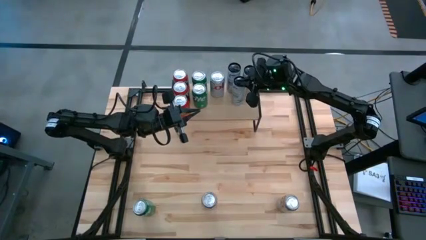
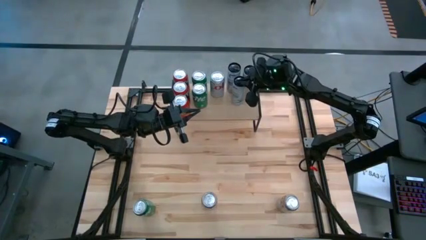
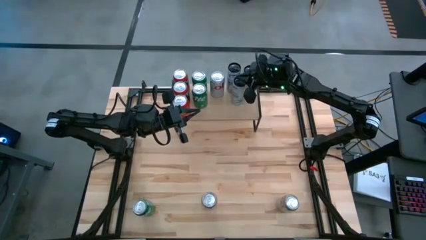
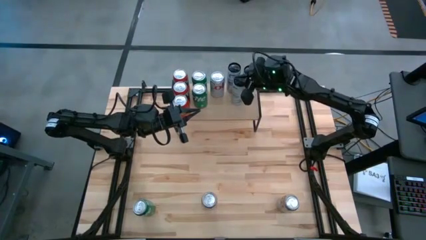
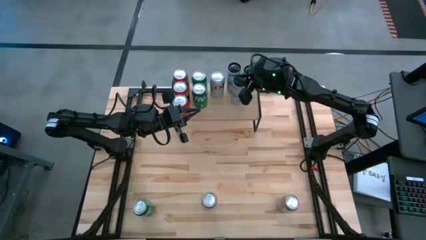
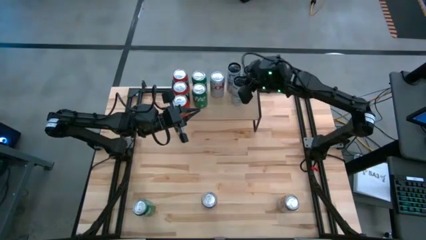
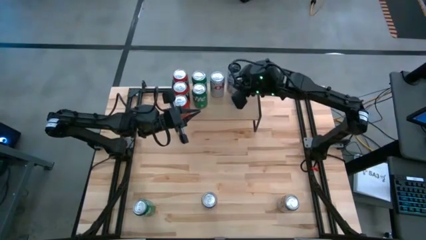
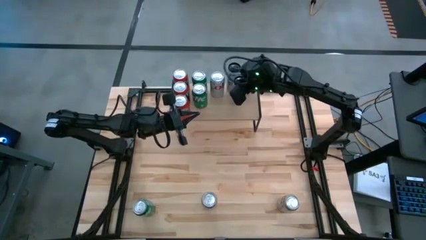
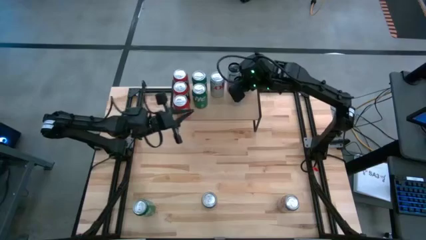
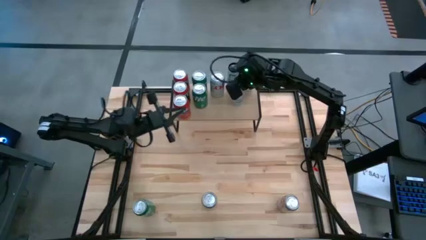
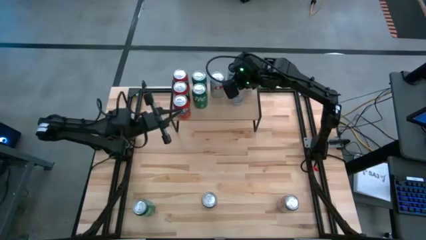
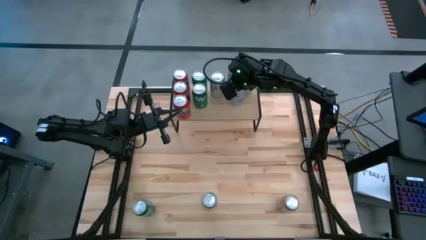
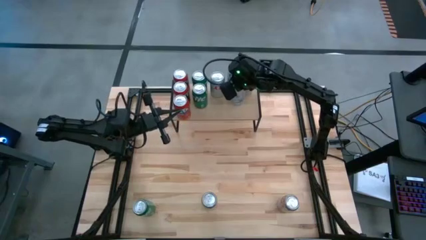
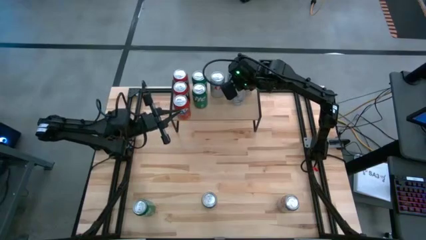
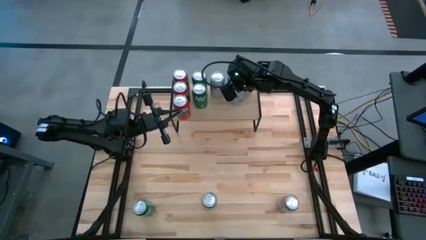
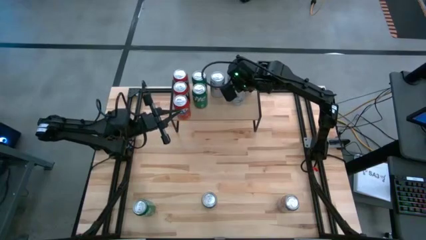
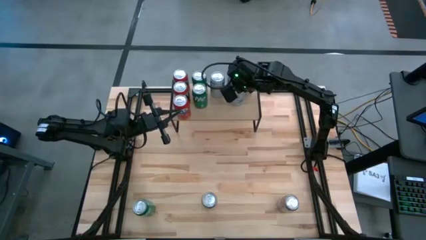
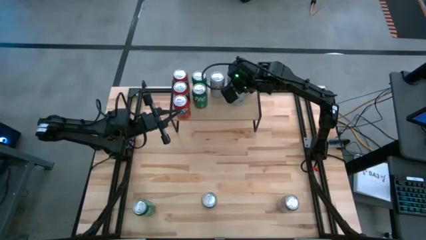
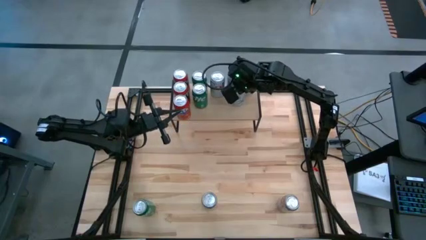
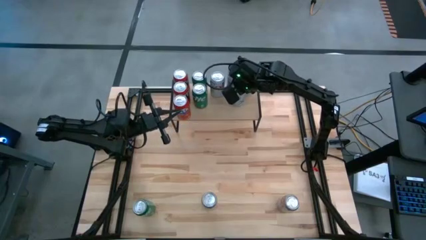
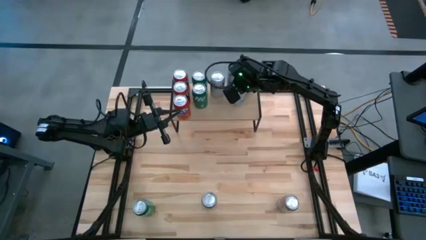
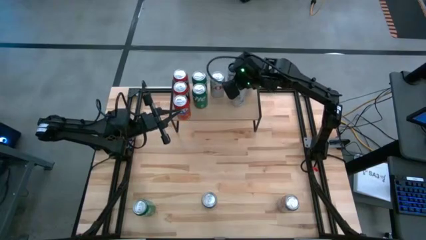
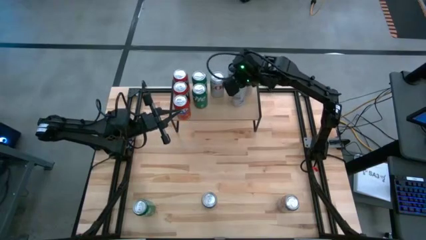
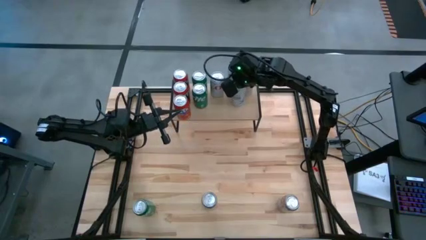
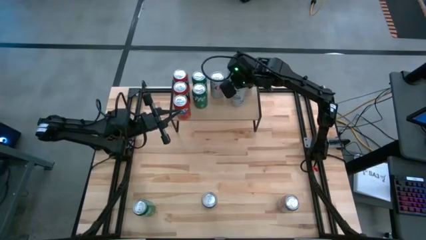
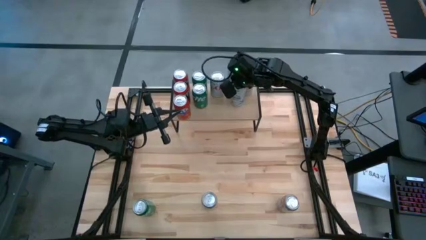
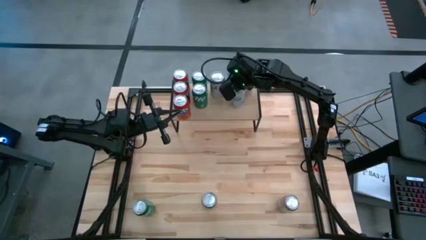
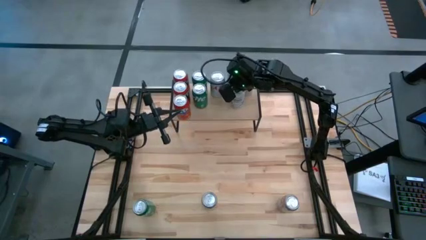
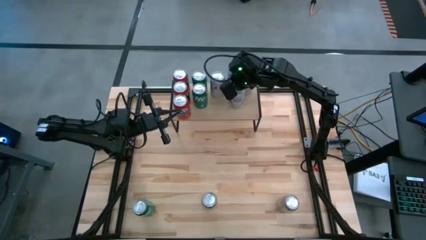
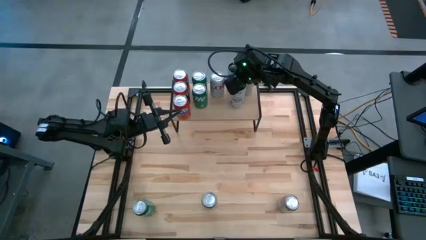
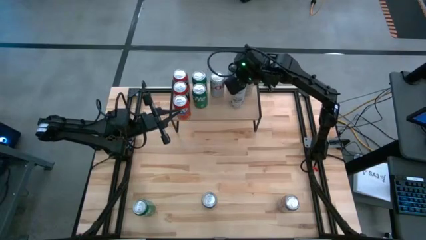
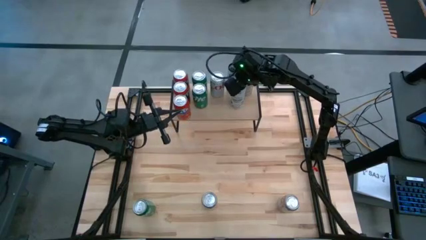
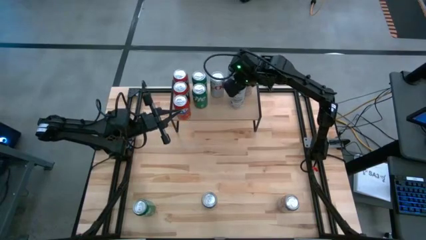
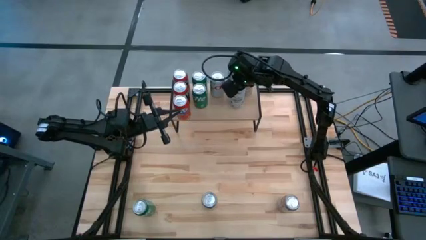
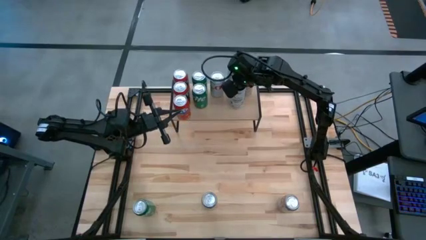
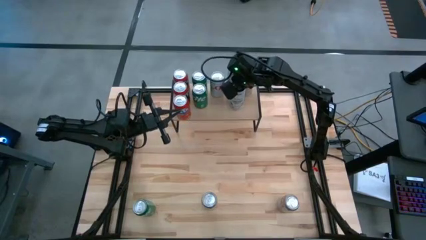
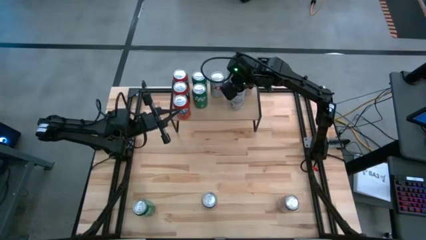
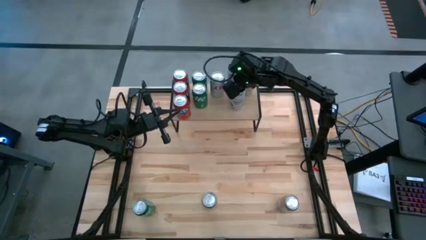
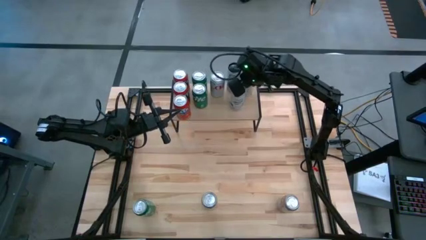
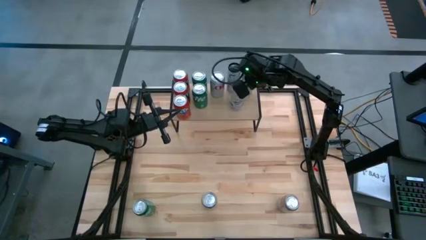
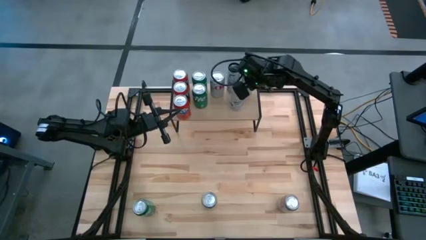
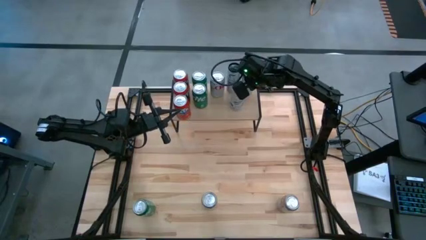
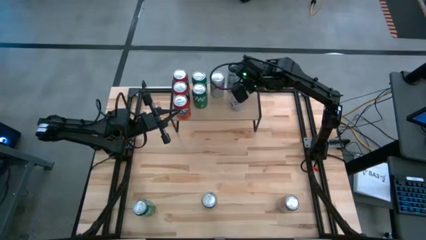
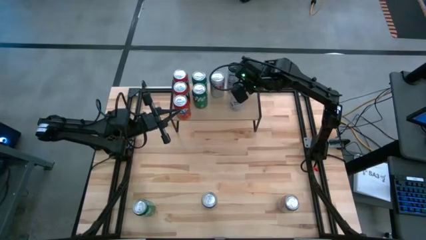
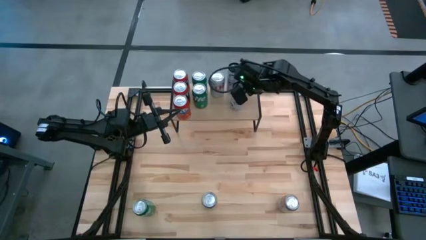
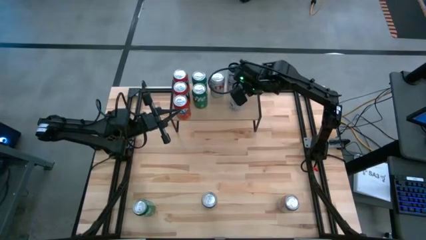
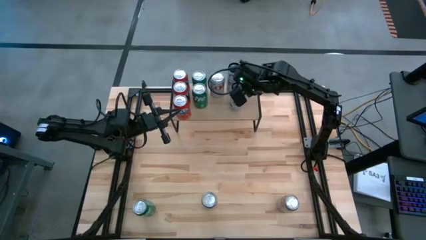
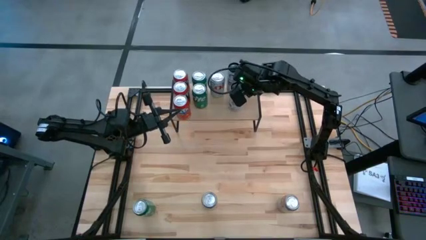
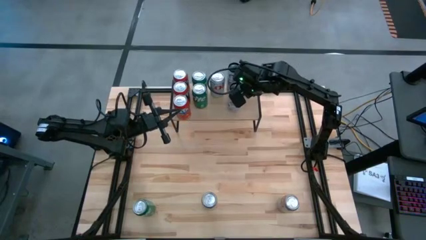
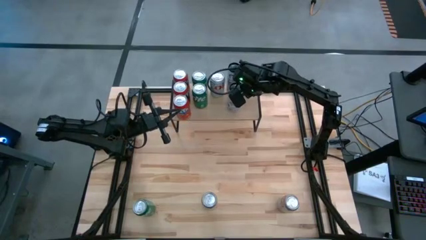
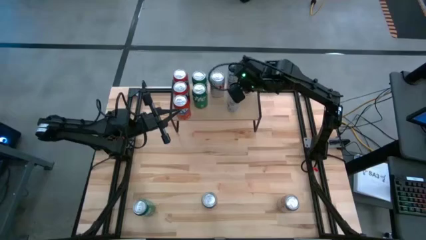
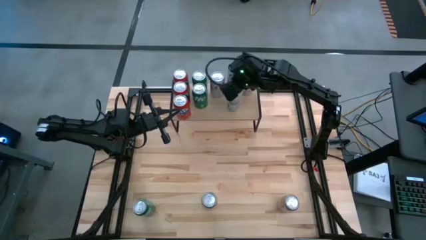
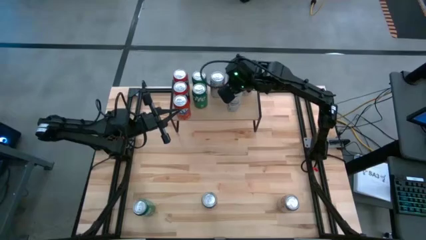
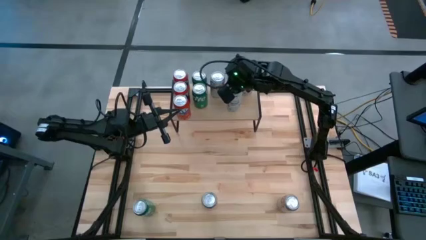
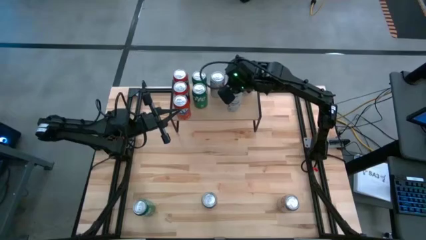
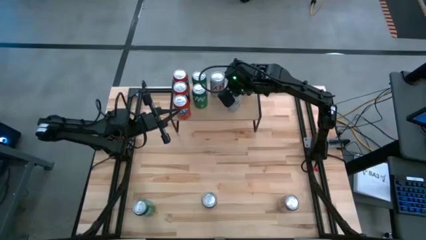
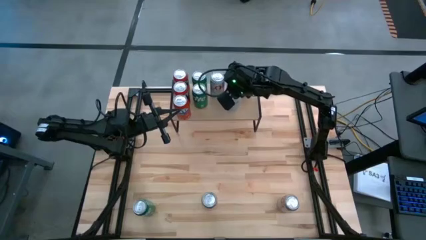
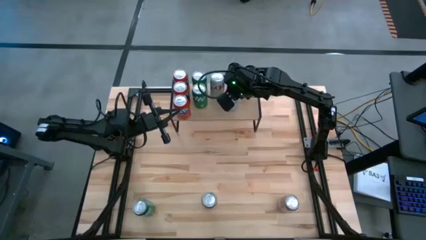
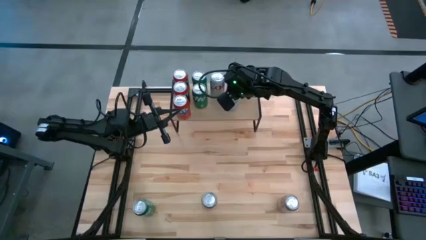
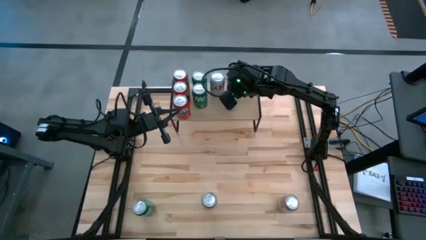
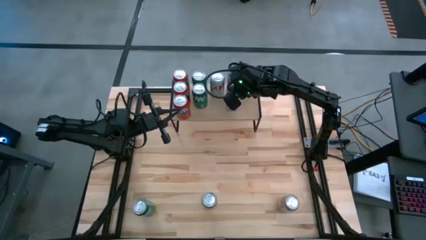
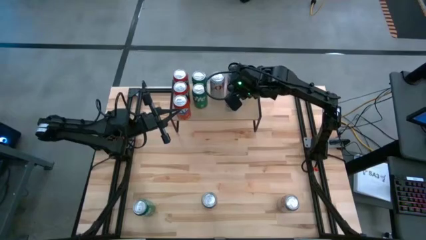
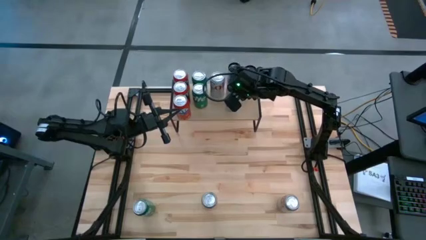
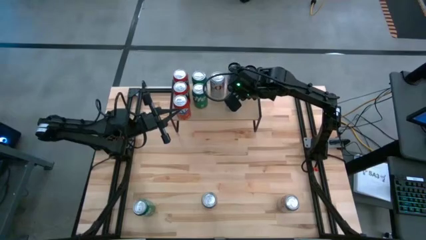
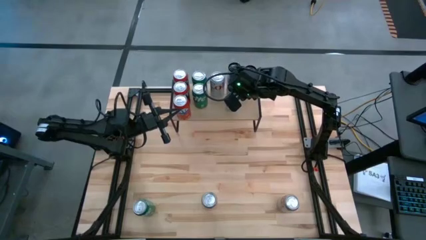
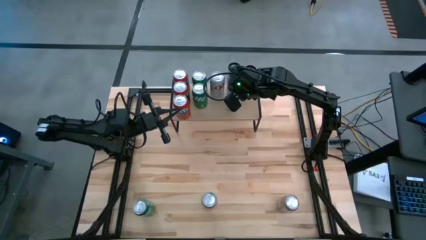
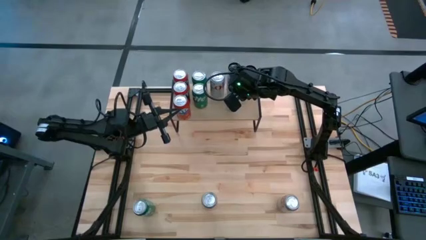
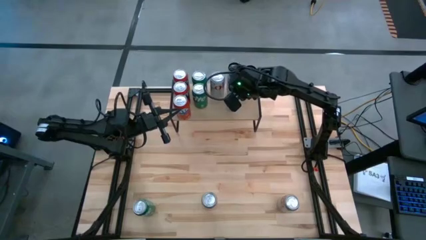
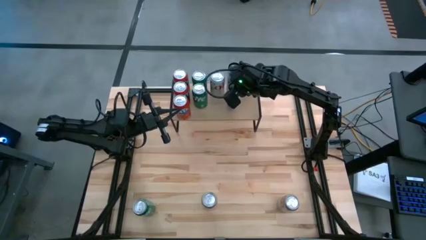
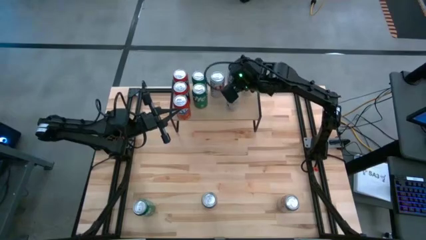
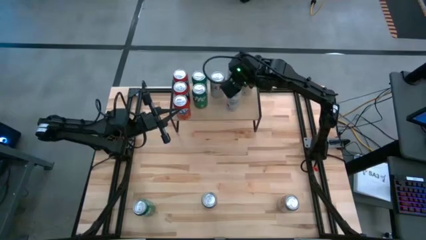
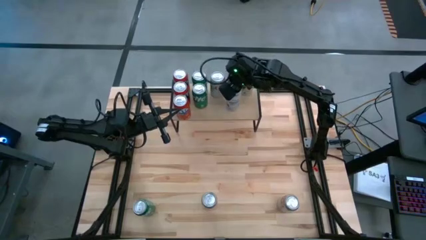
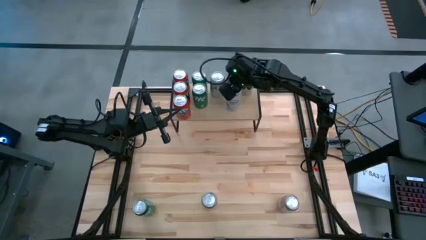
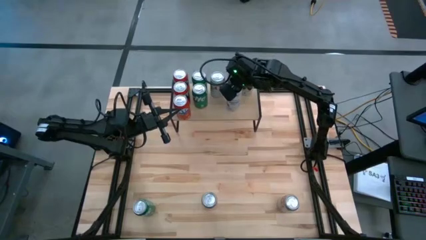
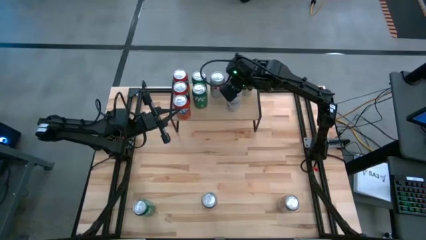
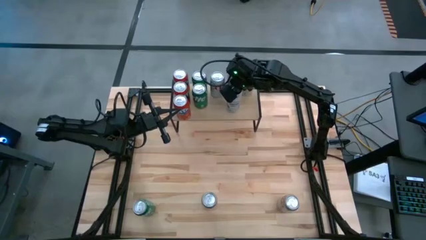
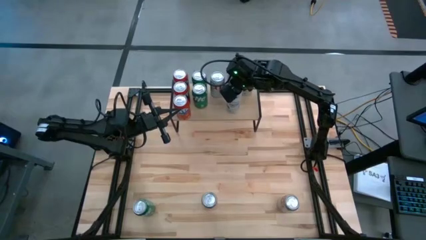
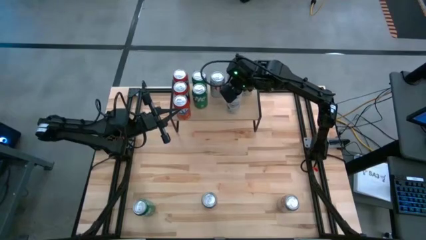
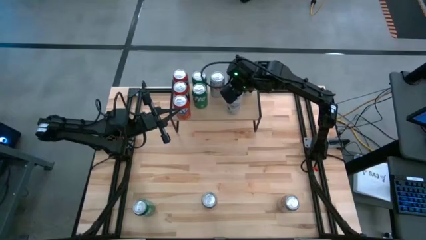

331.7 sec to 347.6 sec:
Task: Place canned beverage on shelf
Adjust the soda cans on the shelf

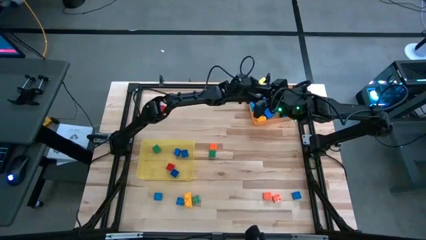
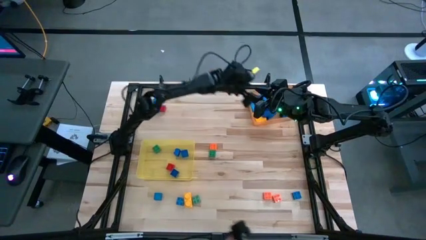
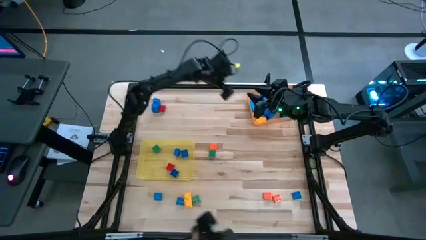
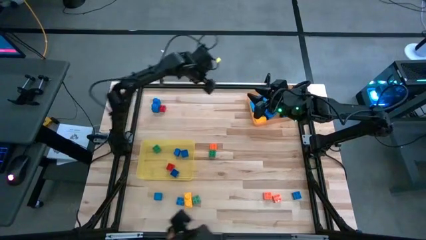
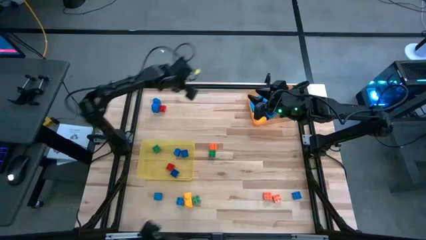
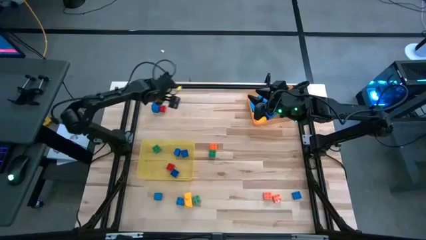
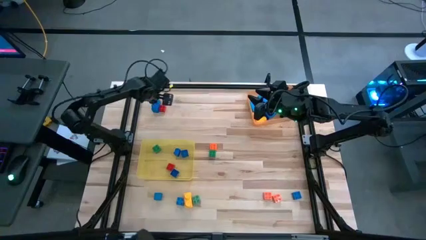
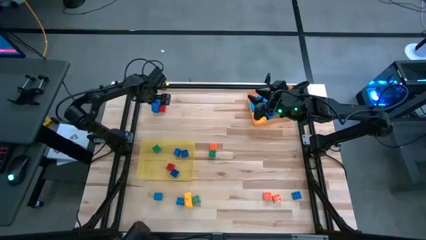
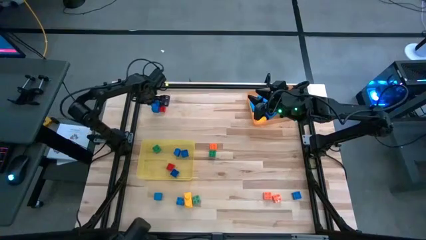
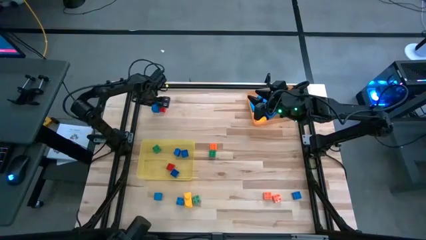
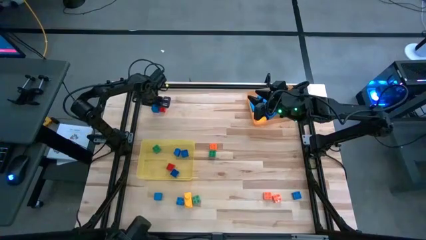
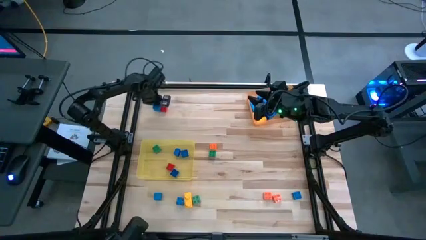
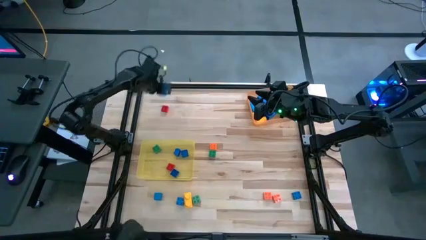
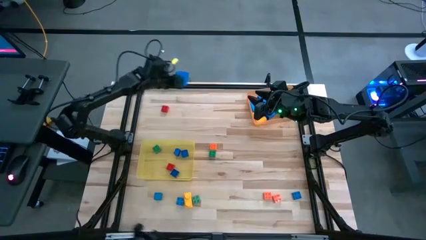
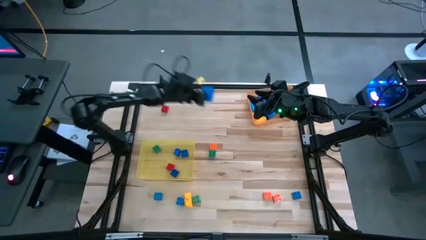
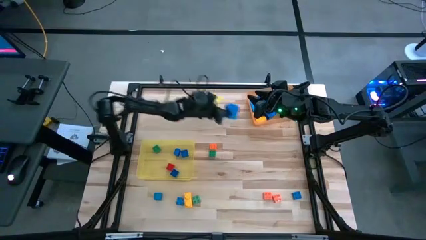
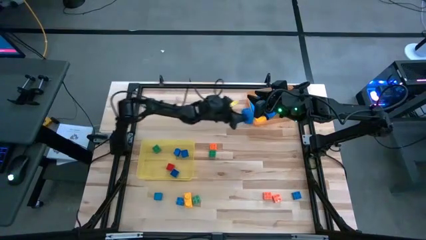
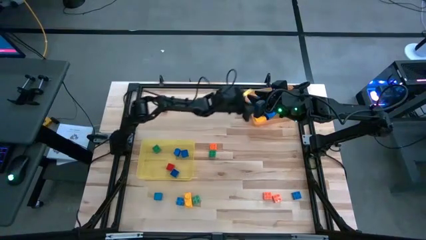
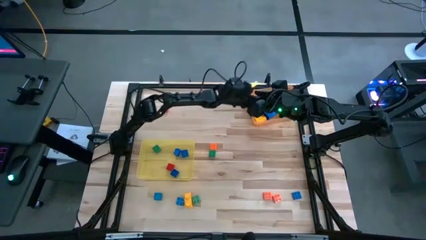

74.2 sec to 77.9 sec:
Task: Sort blocks by size
Put the large blue 2 stud game piece into the orange bin
